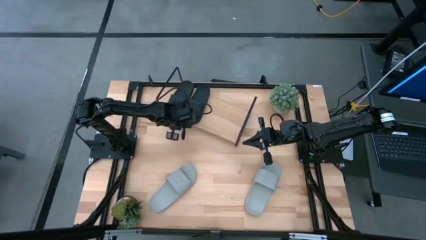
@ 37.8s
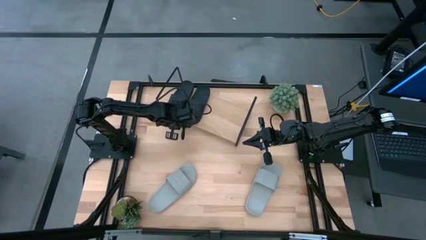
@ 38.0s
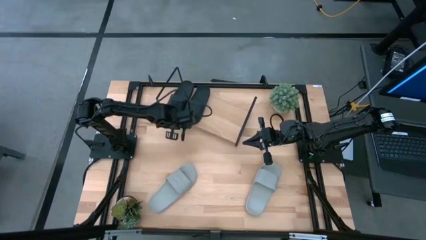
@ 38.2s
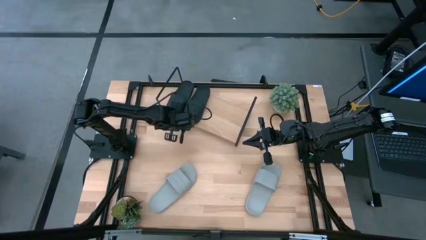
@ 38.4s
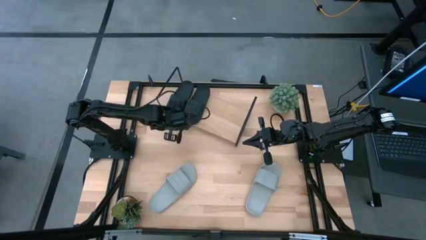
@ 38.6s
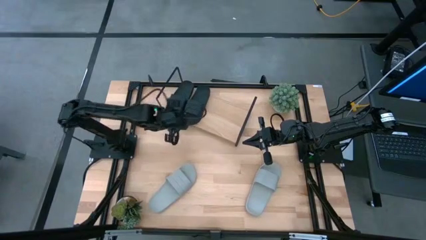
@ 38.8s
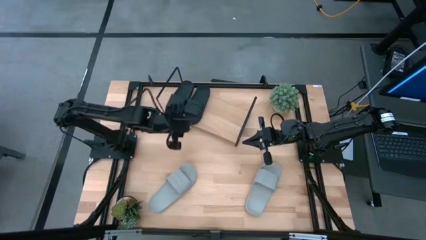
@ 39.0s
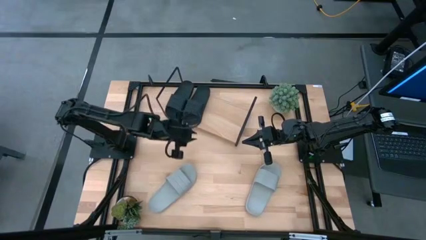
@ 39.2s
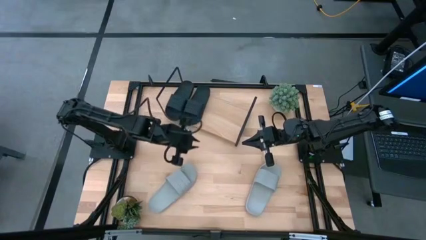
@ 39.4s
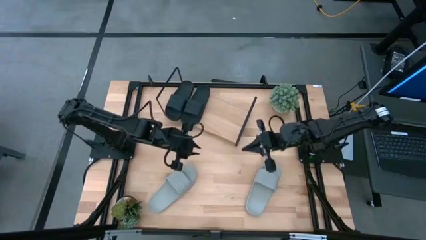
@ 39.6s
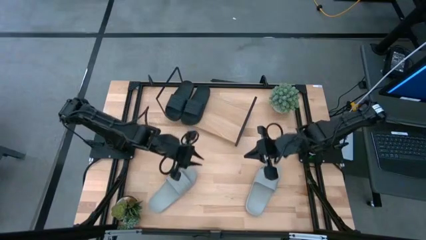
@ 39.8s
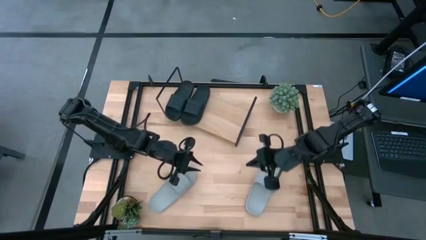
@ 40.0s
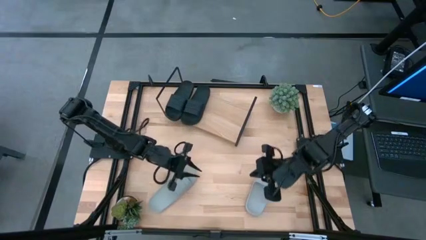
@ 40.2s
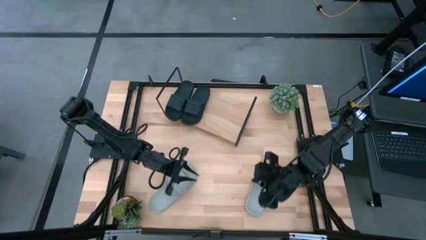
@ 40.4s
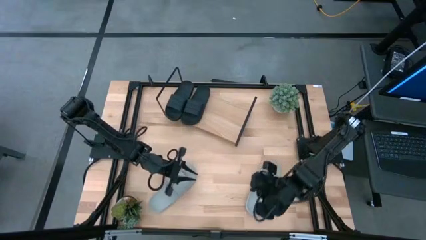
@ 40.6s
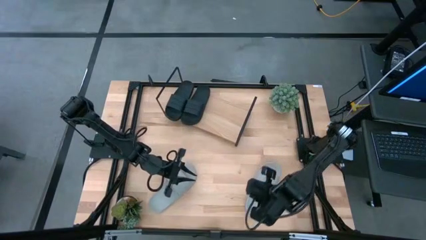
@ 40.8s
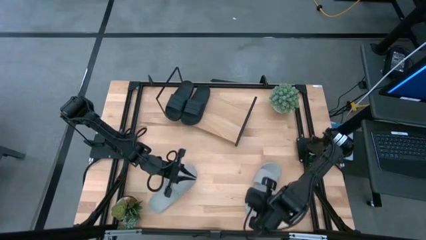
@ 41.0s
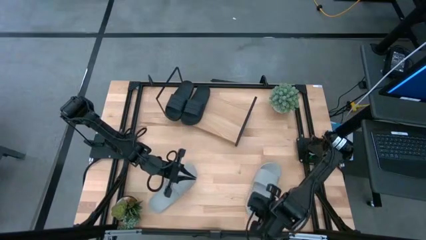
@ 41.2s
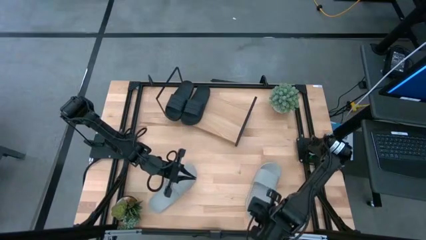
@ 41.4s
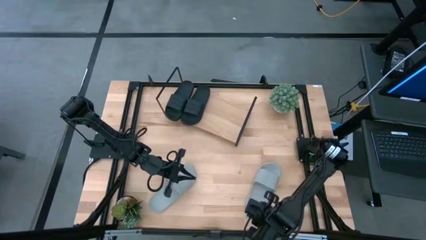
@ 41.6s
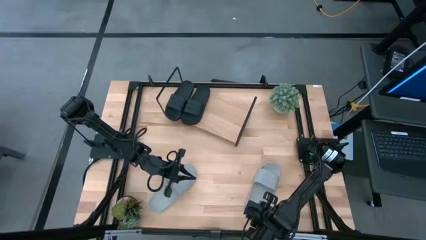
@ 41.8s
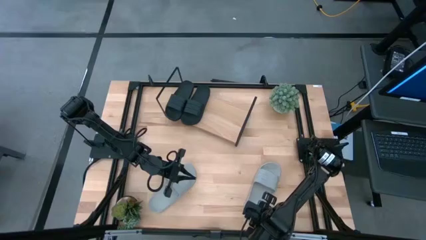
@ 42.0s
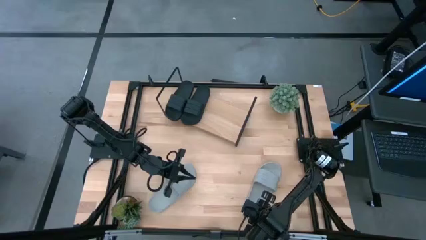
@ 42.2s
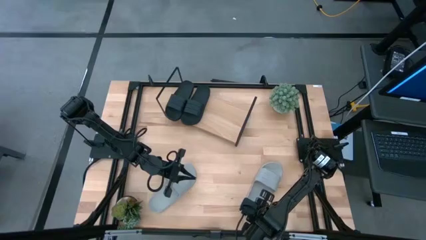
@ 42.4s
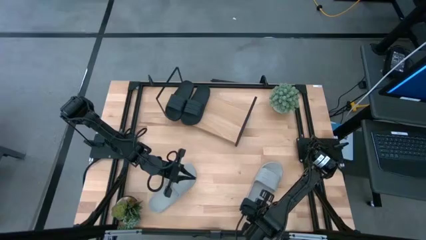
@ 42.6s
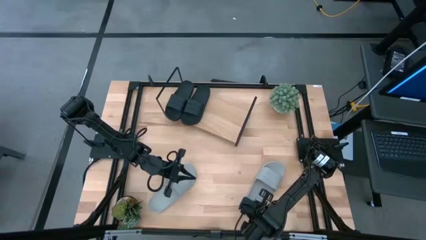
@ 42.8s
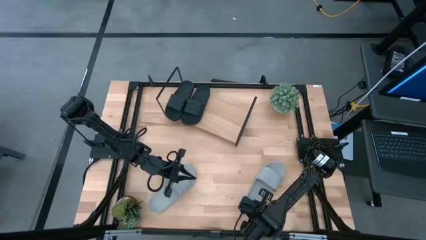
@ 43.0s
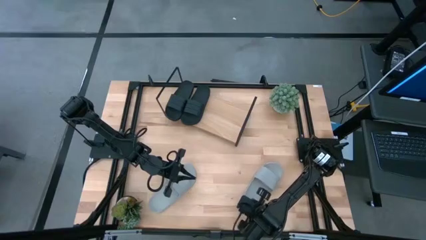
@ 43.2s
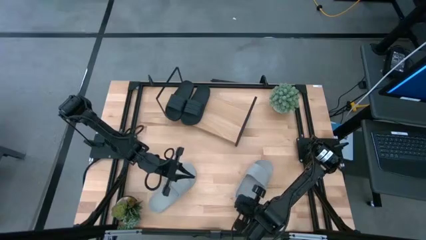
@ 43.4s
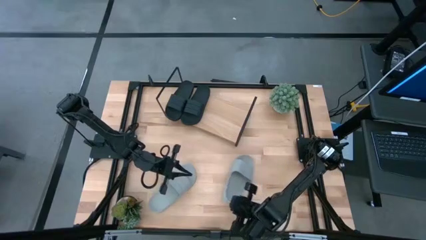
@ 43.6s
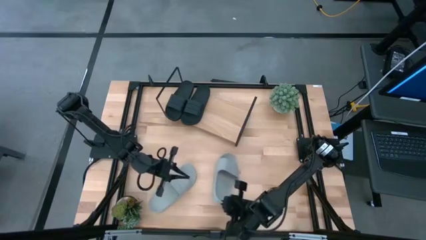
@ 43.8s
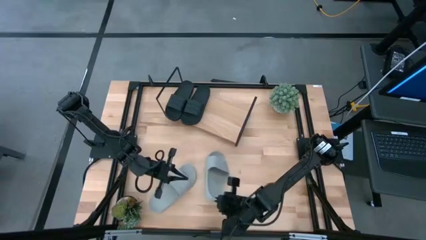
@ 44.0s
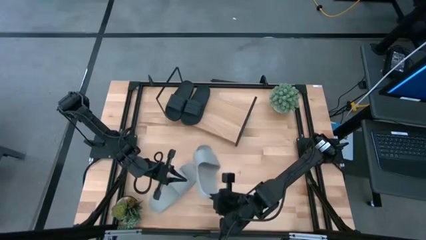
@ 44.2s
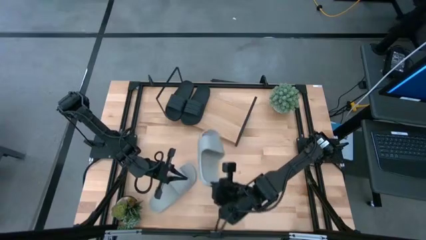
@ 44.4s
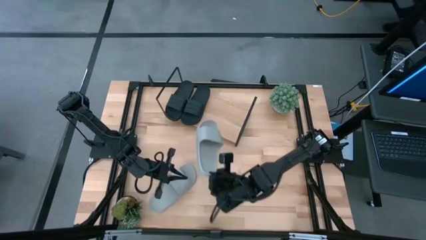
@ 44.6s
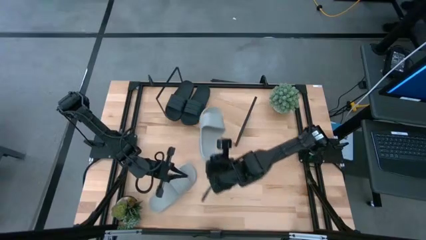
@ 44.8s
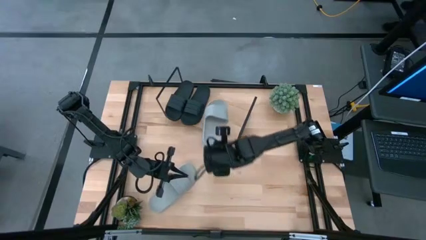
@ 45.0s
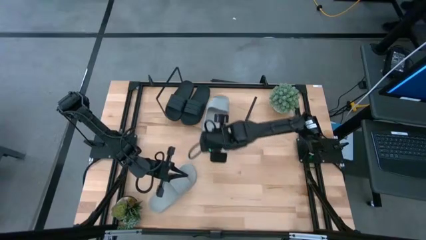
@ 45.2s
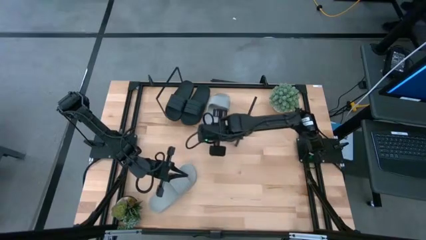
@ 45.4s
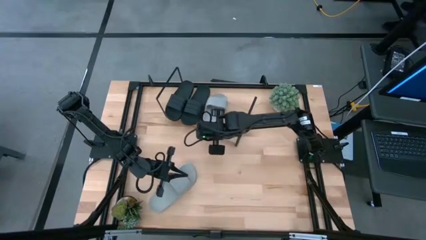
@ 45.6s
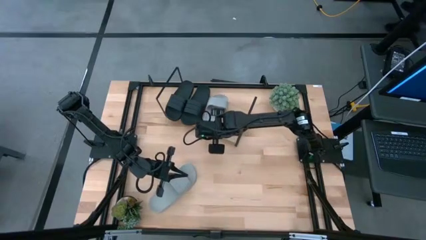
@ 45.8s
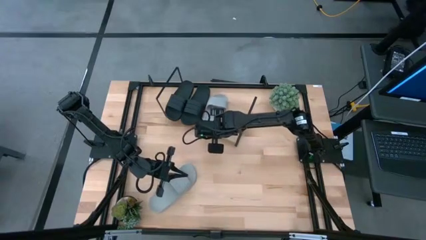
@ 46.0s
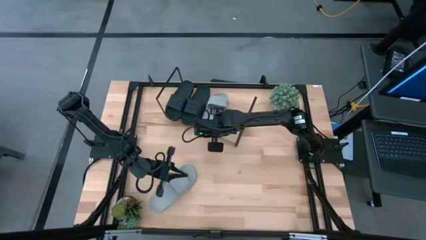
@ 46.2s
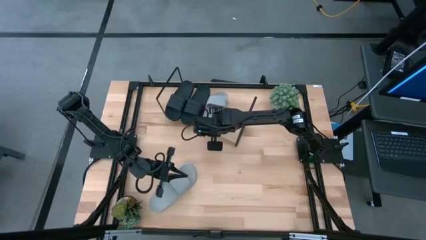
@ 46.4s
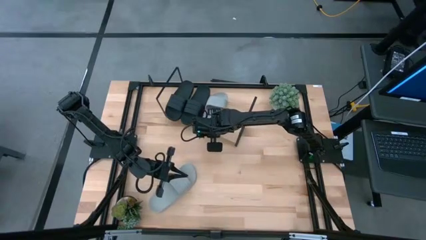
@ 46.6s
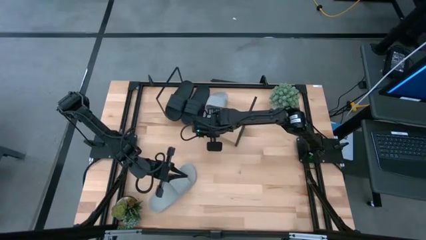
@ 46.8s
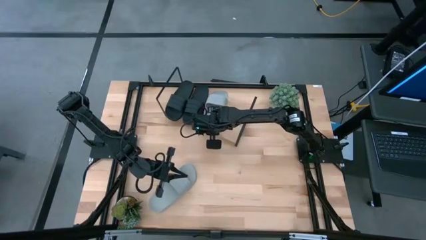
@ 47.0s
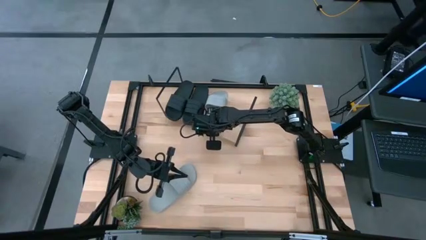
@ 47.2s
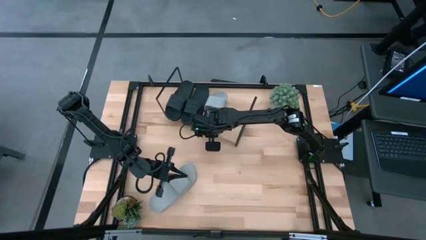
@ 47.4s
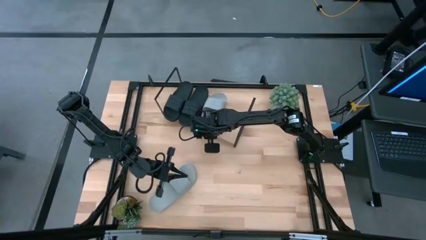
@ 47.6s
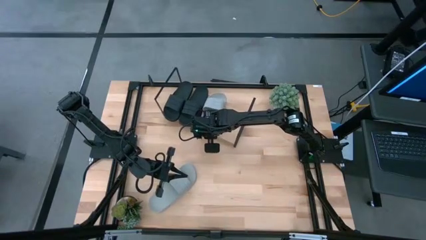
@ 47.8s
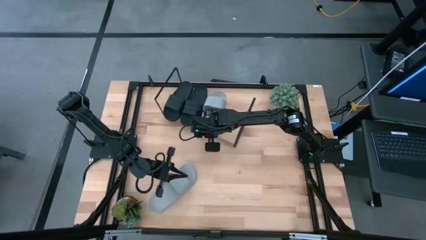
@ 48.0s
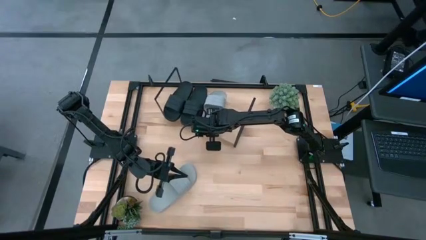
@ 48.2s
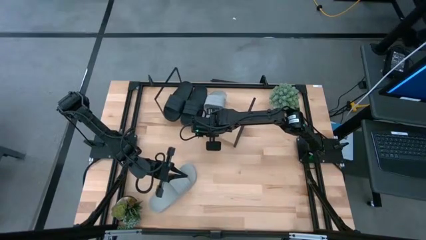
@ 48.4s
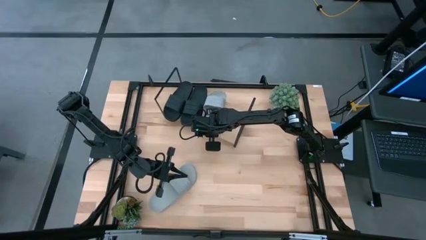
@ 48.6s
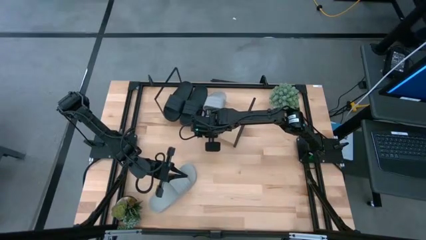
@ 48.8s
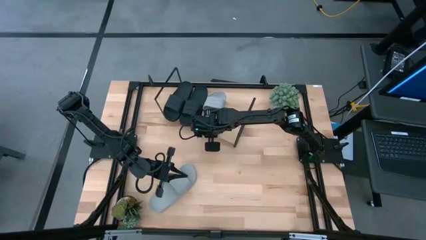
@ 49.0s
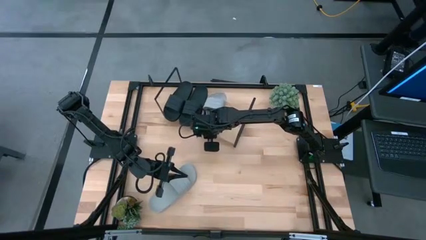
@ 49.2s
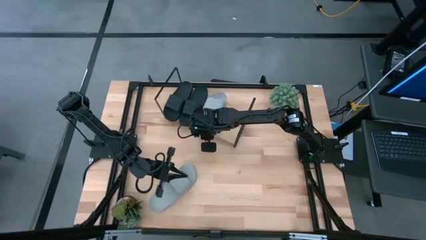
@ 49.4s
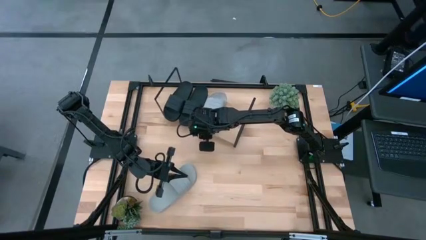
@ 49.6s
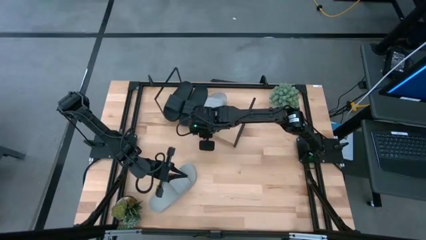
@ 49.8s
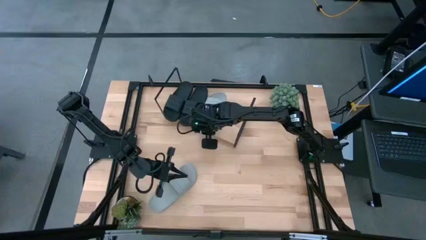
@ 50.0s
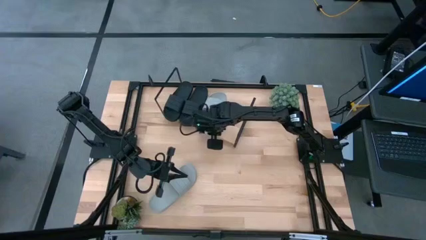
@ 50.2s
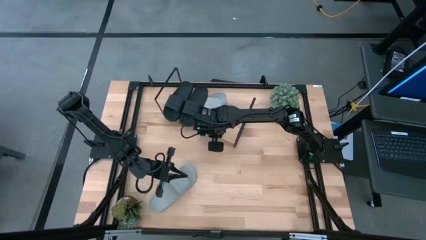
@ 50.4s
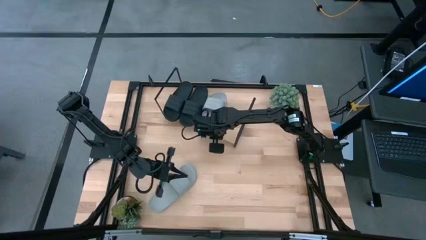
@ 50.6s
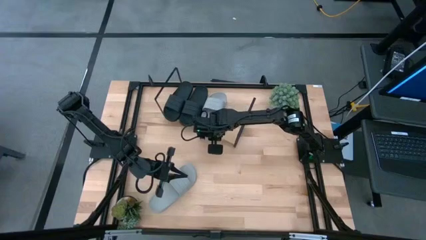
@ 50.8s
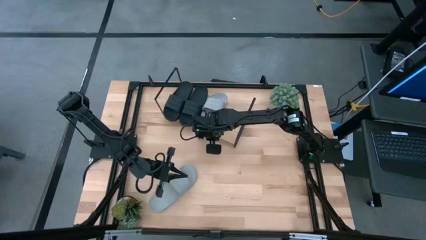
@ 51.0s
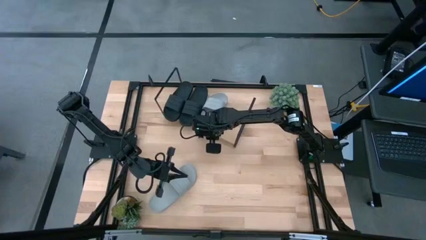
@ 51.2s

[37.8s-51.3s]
Task: Pick and place slides into the shelf
Put the right gray slide on the shelf
